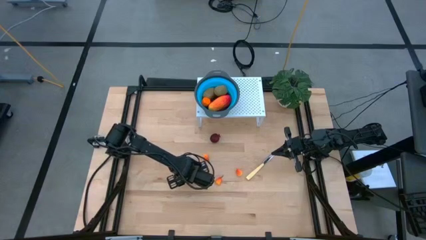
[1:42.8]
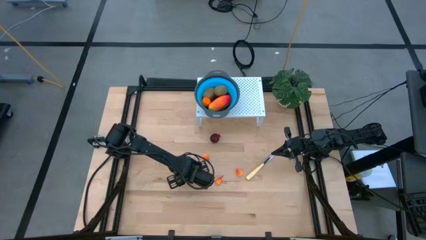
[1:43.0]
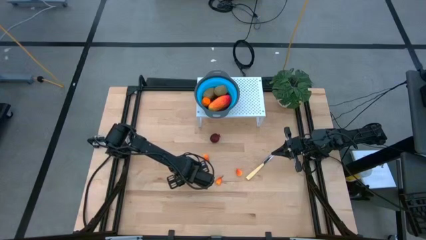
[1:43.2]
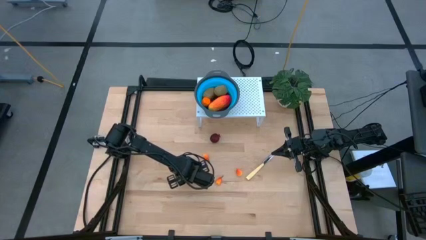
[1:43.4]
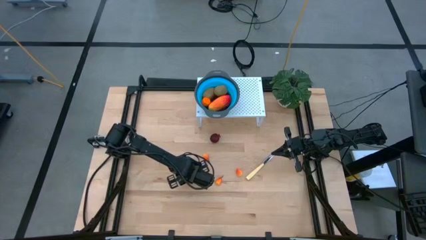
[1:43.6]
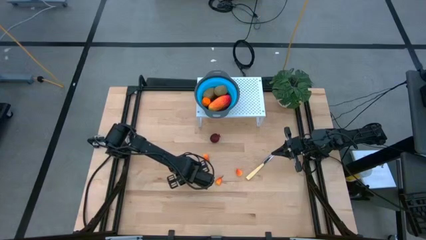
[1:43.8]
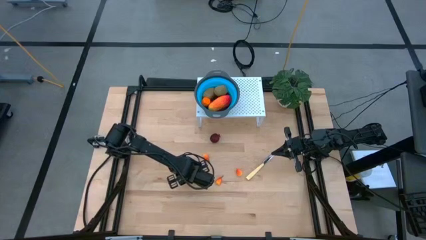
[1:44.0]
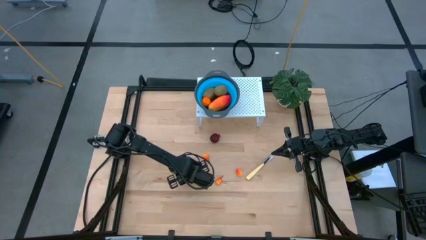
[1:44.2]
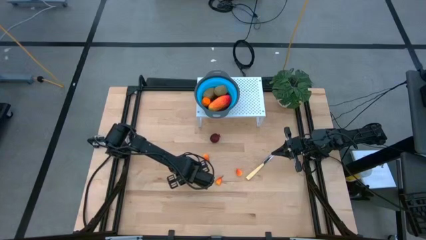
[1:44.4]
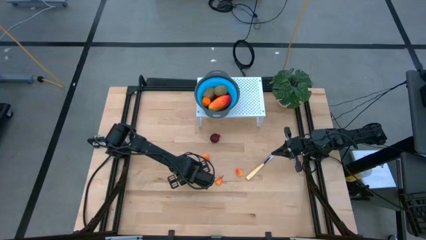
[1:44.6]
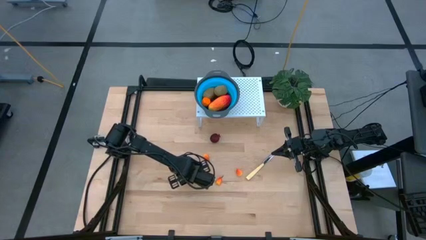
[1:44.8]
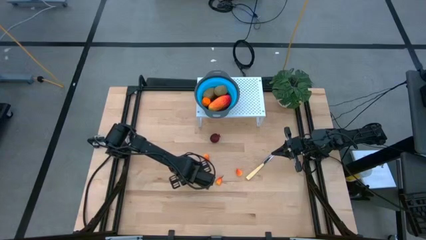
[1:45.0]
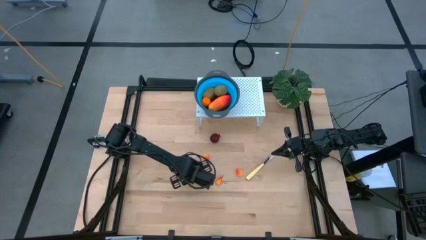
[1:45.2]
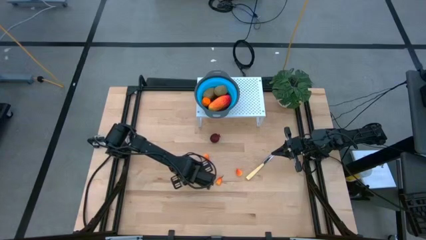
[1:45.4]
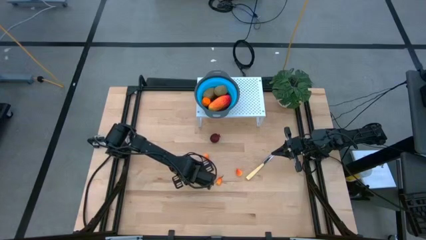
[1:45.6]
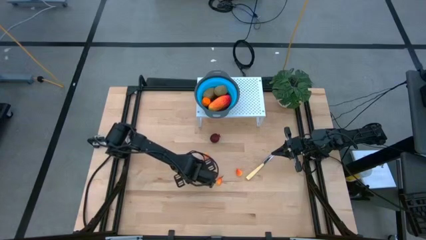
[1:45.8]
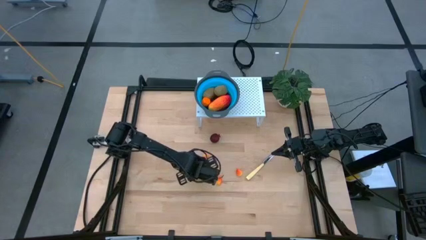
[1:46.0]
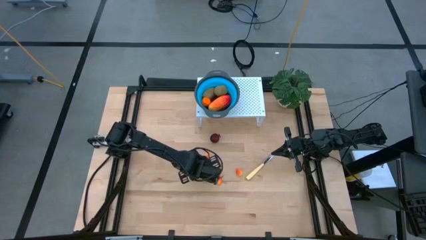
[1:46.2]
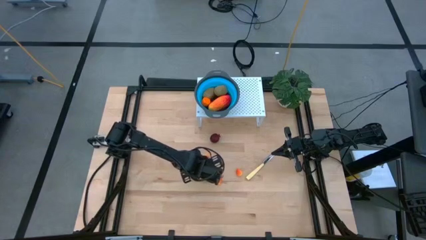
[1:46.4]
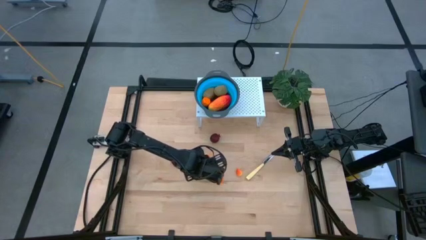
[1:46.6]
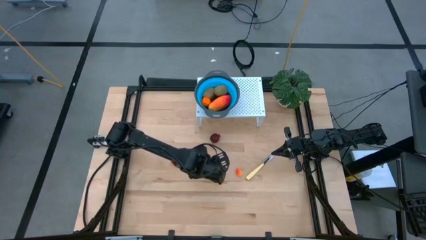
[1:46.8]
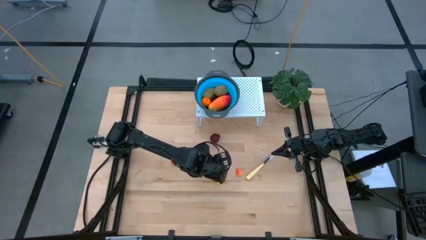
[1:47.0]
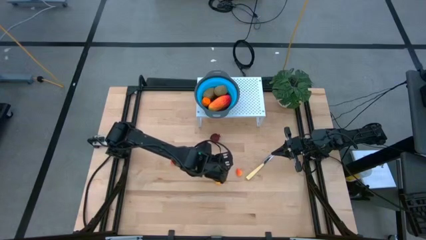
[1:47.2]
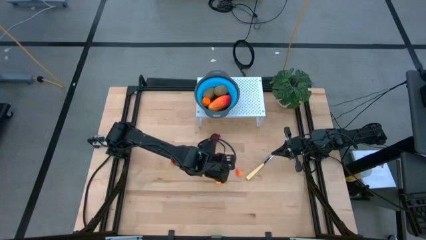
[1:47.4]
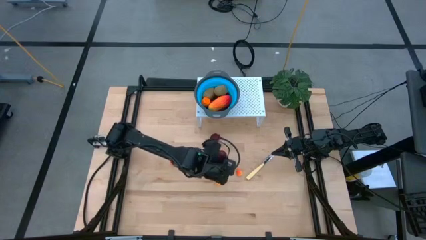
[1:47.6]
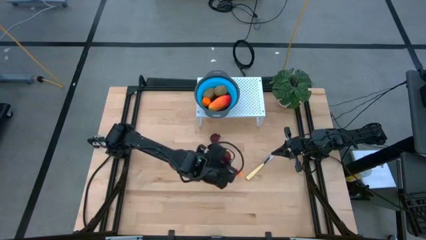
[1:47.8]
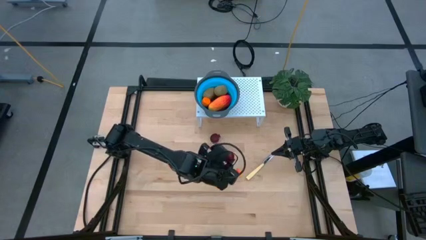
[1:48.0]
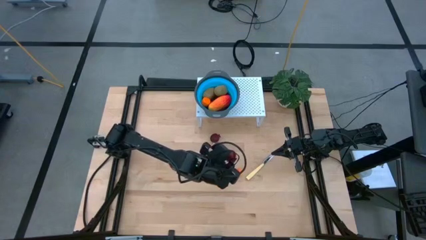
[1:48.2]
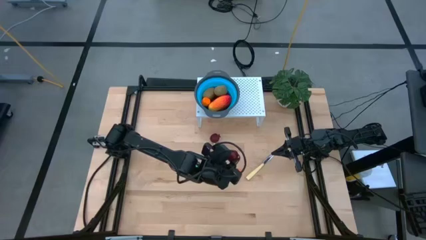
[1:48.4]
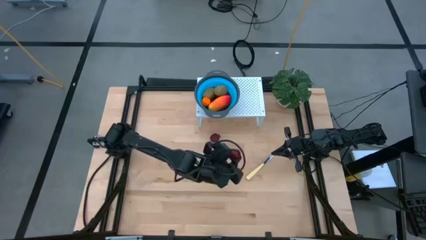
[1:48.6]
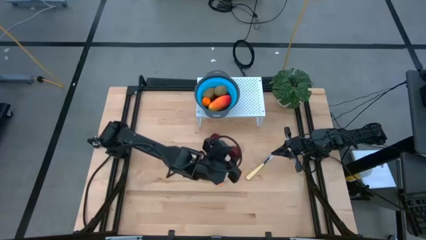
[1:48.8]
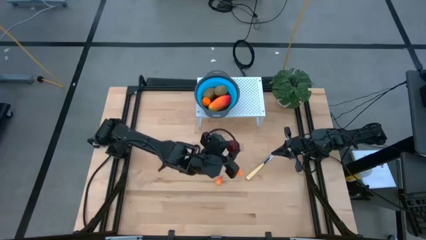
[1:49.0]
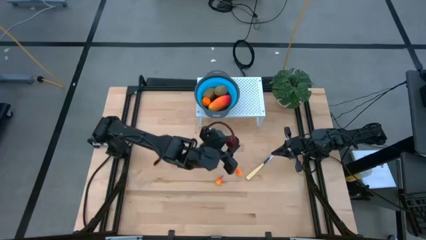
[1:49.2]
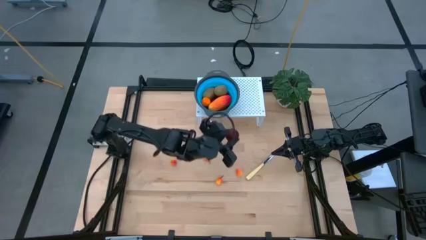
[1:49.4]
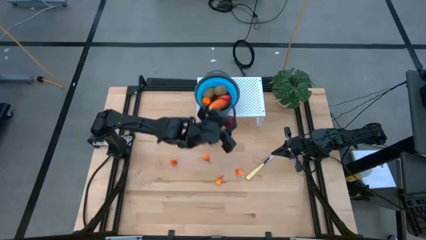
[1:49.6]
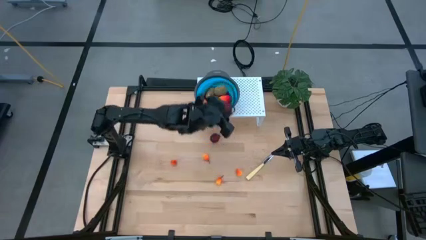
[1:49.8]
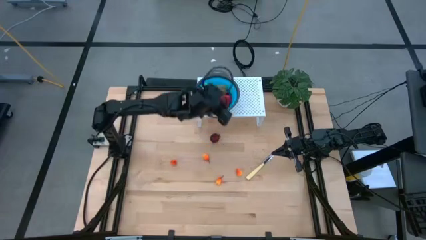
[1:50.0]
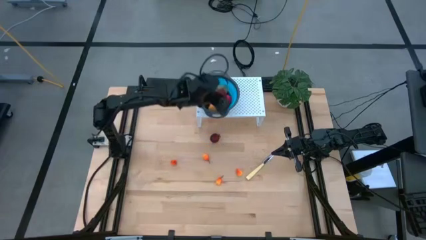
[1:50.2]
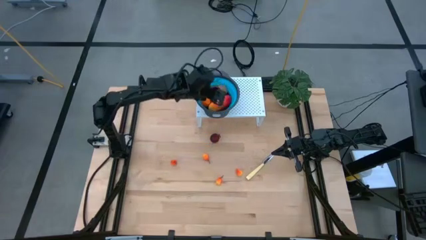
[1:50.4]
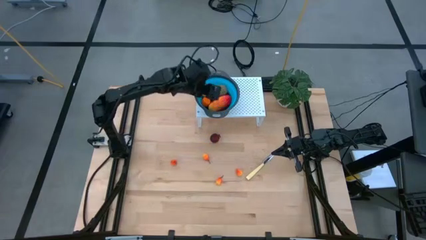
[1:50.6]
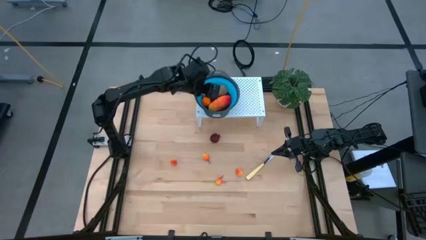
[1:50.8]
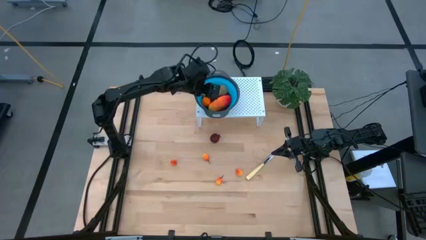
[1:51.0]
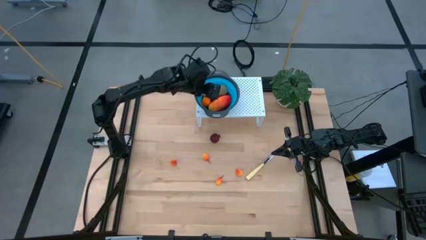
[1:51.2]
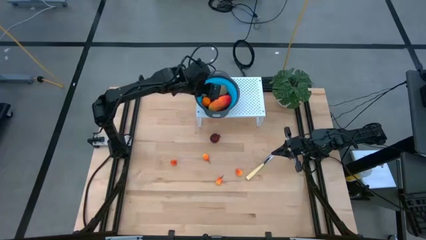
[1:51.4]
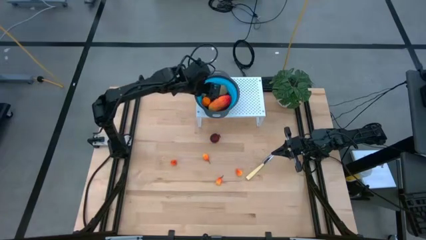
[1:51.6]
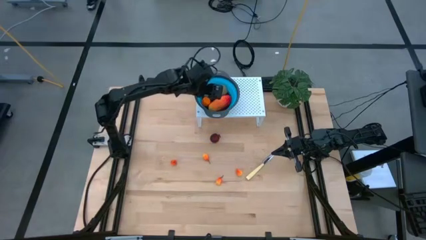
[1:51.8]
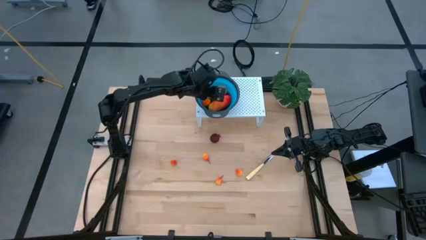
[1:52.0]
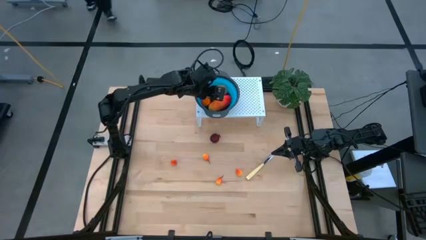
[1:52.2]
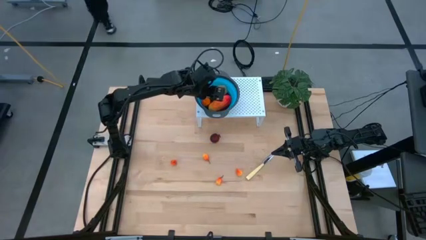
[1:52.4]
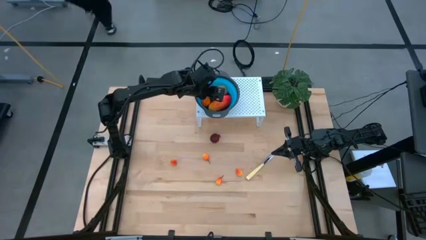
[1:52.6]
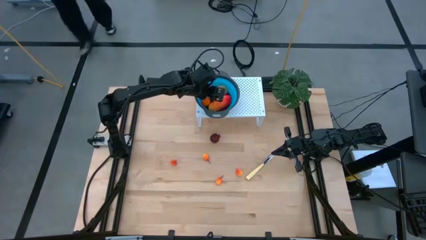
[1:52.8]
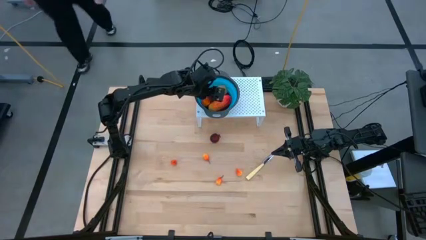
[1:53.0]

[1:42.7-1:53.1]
Task: Pick & Place Fruit
Put the bottom pomegranate into the blue strainer bowl on the shelf
